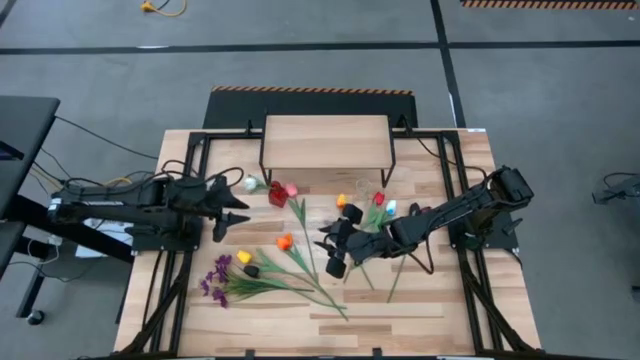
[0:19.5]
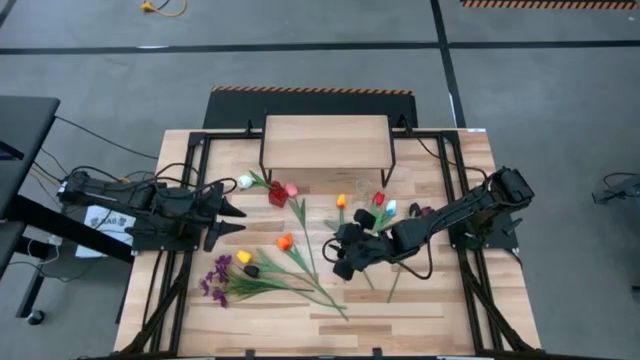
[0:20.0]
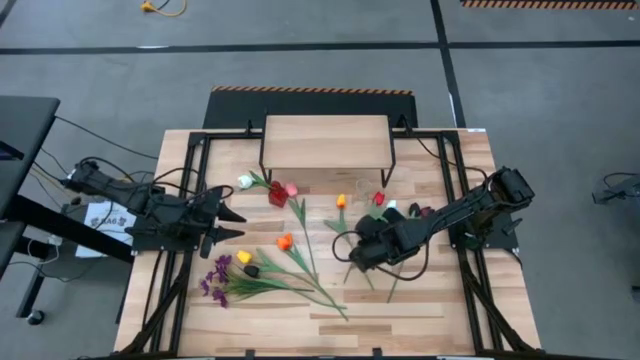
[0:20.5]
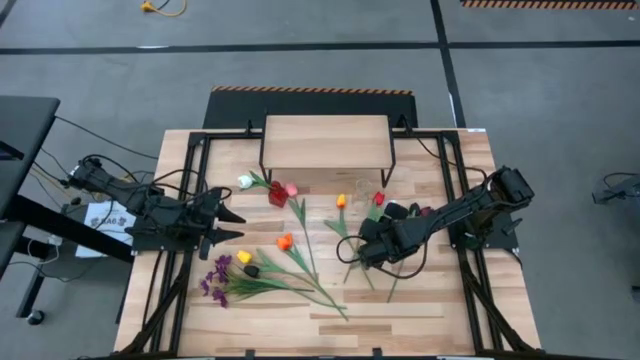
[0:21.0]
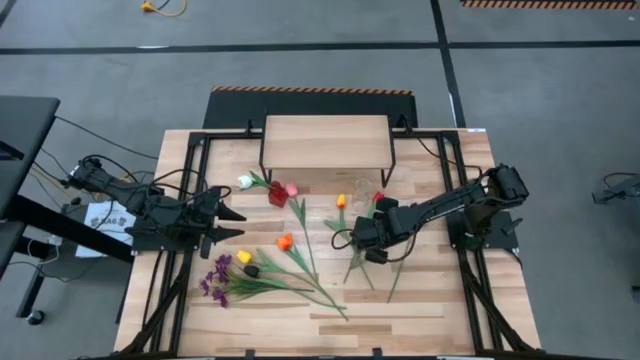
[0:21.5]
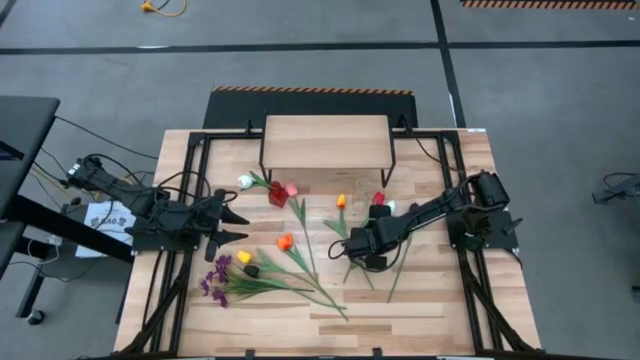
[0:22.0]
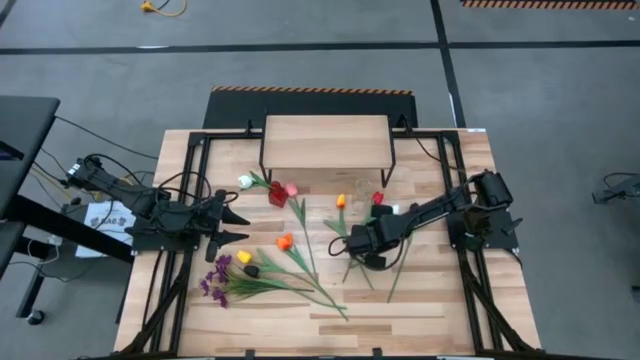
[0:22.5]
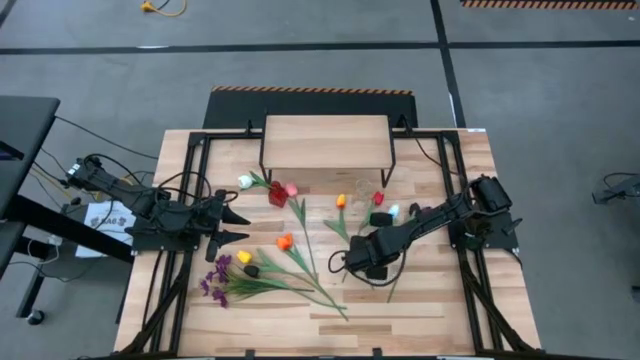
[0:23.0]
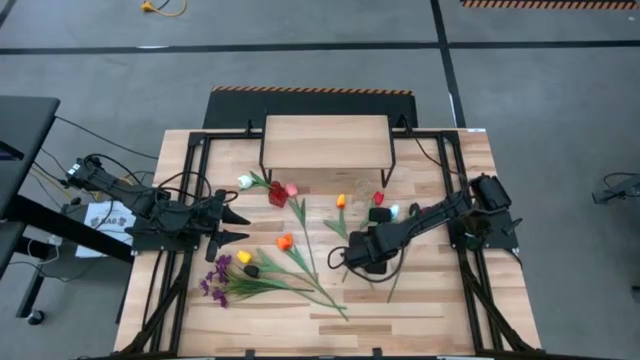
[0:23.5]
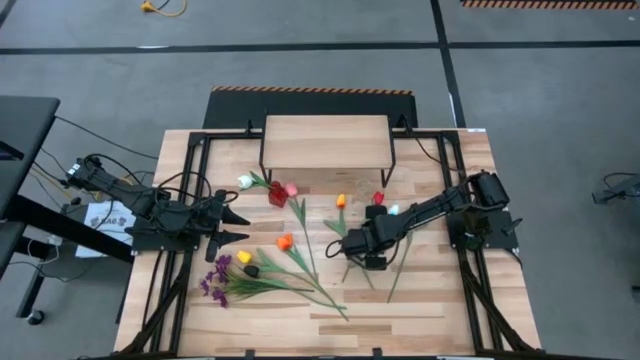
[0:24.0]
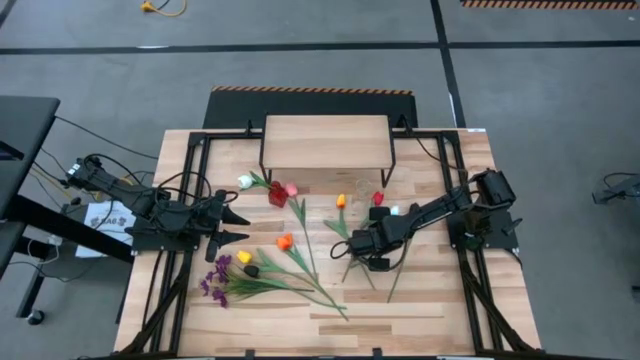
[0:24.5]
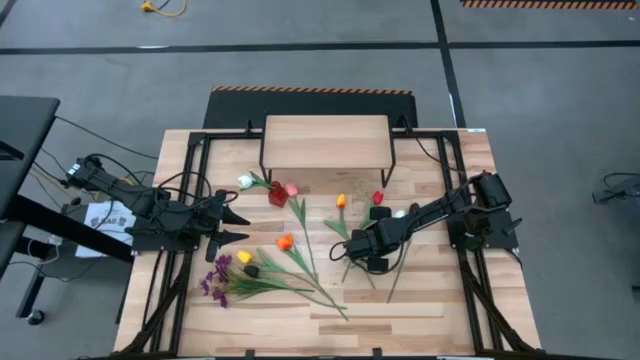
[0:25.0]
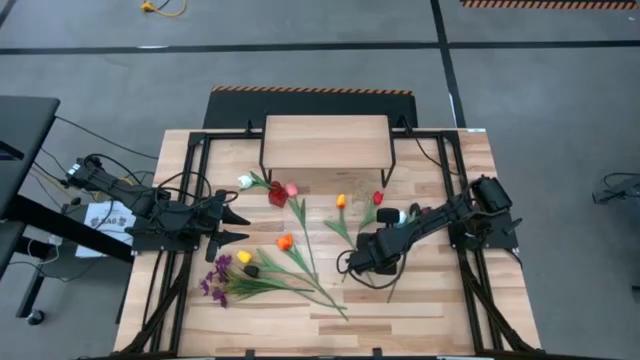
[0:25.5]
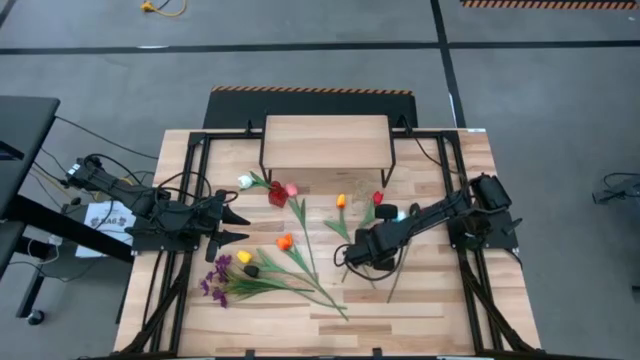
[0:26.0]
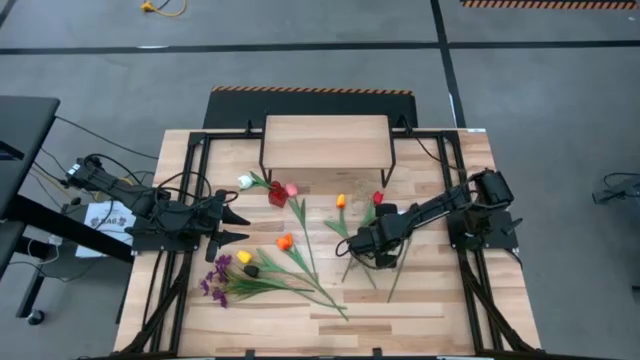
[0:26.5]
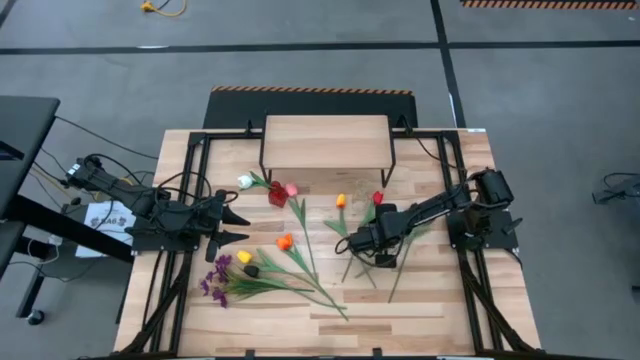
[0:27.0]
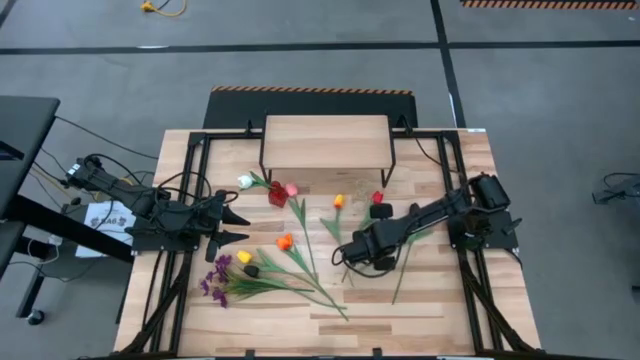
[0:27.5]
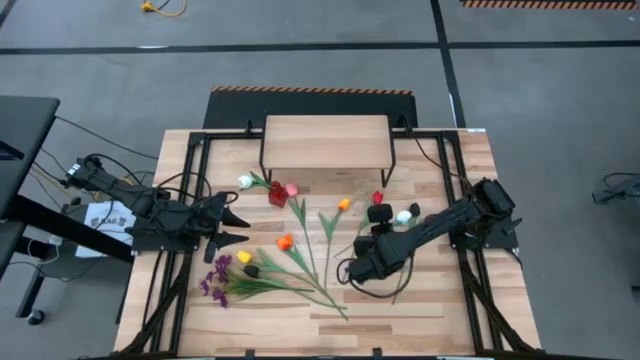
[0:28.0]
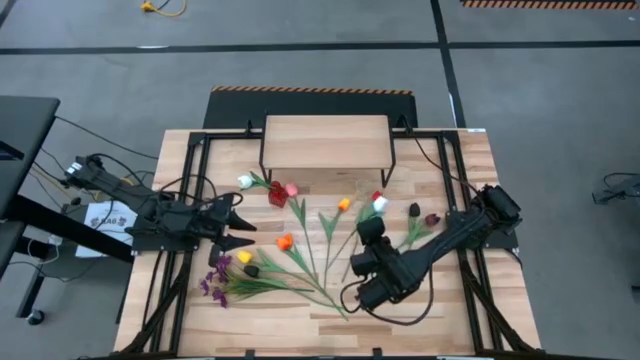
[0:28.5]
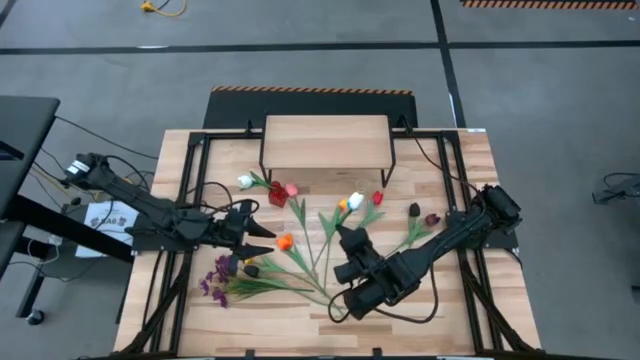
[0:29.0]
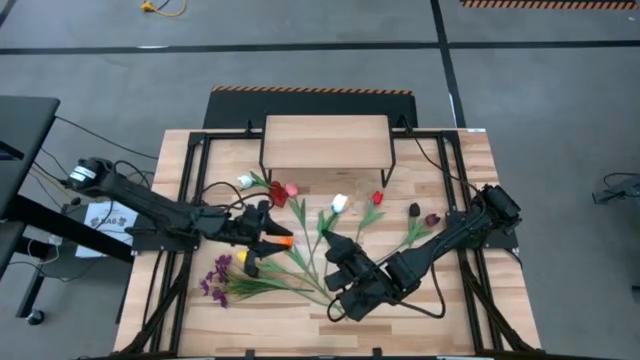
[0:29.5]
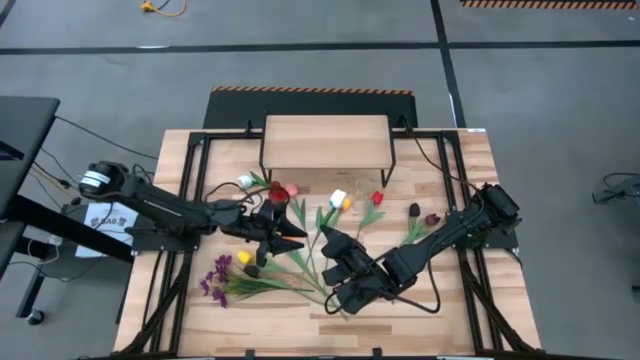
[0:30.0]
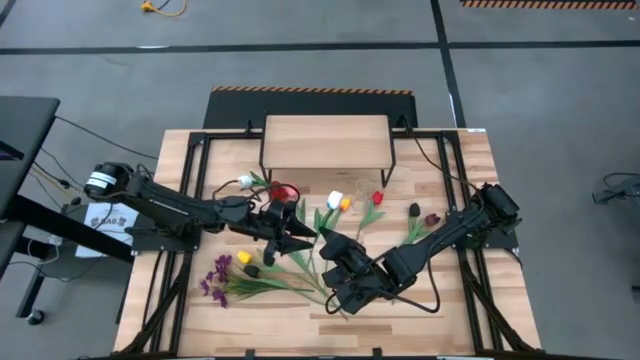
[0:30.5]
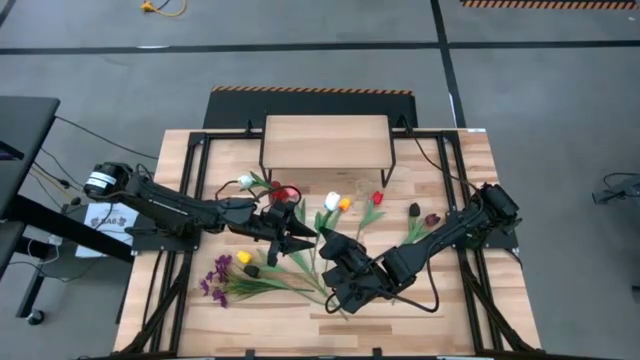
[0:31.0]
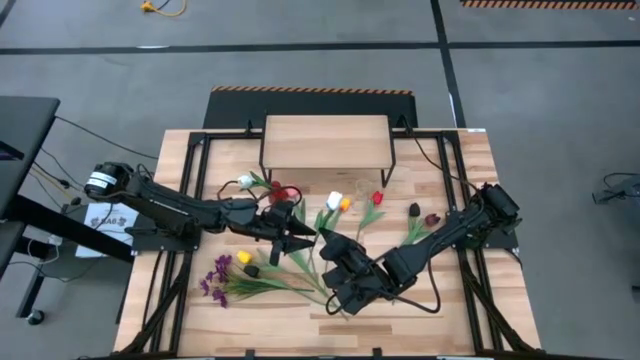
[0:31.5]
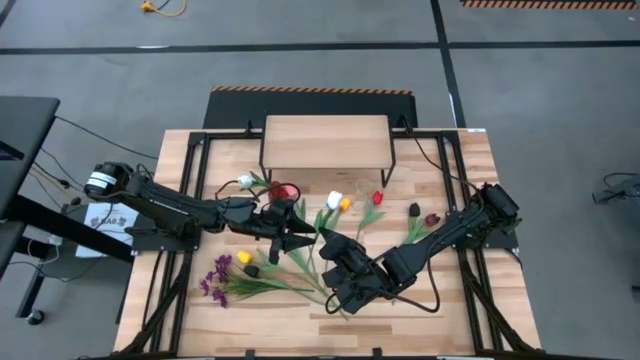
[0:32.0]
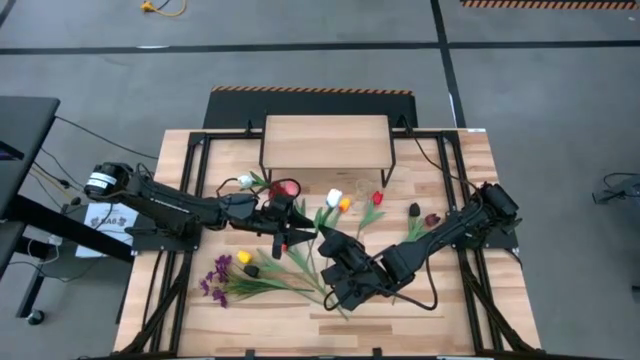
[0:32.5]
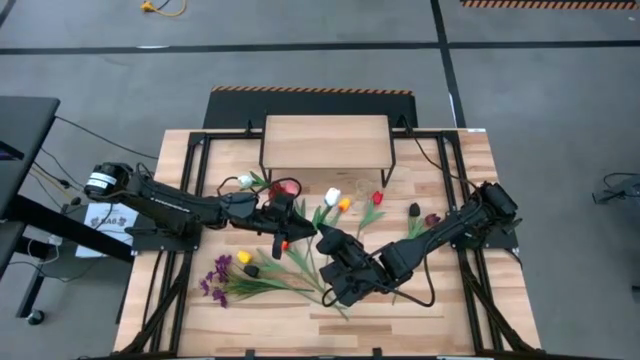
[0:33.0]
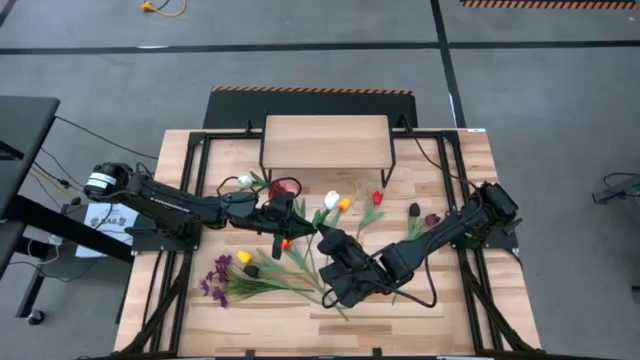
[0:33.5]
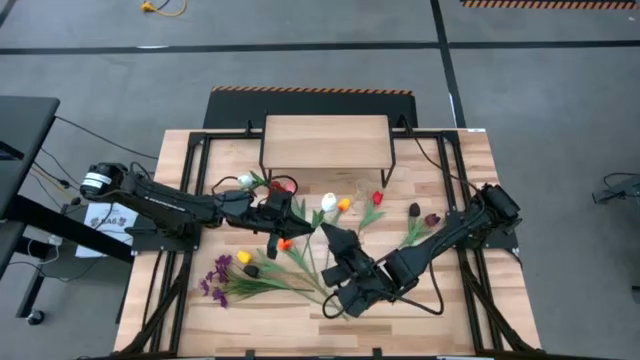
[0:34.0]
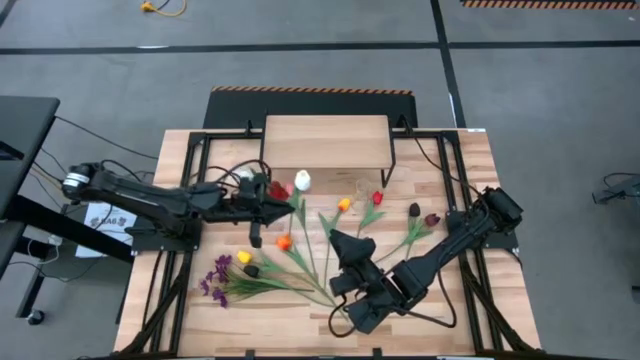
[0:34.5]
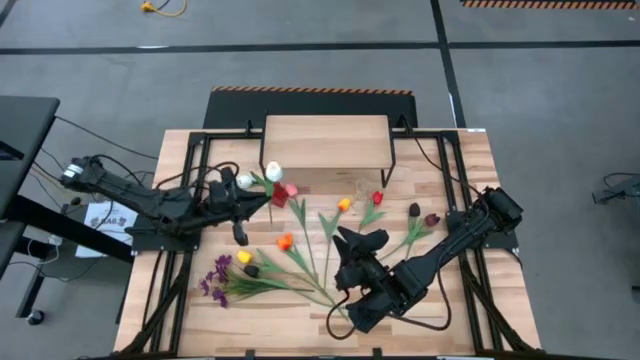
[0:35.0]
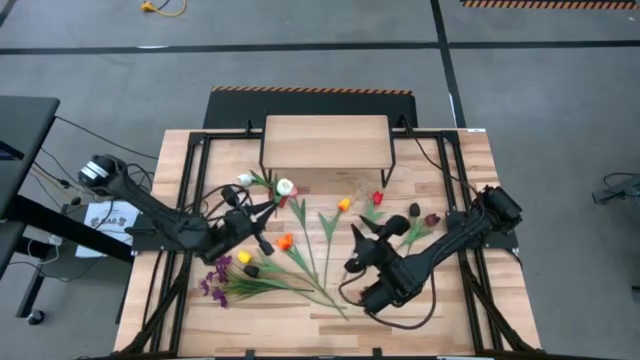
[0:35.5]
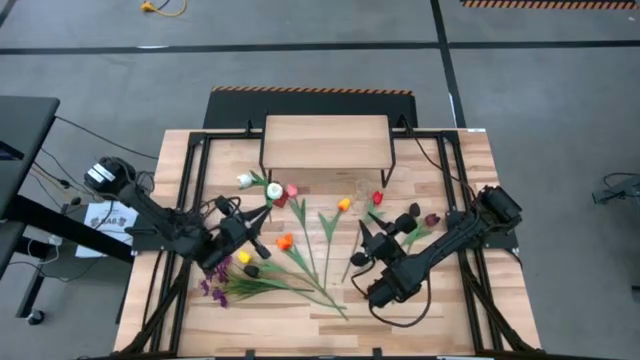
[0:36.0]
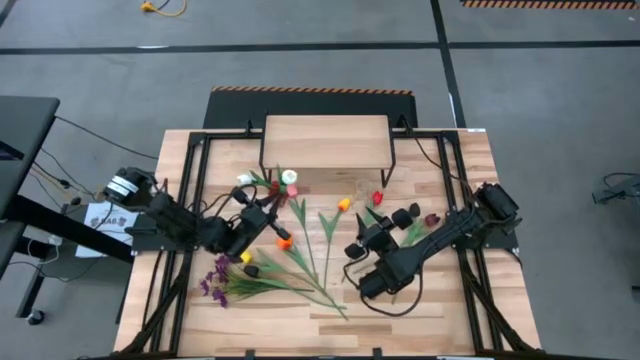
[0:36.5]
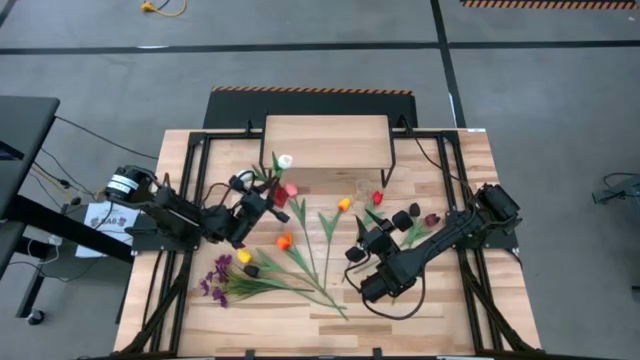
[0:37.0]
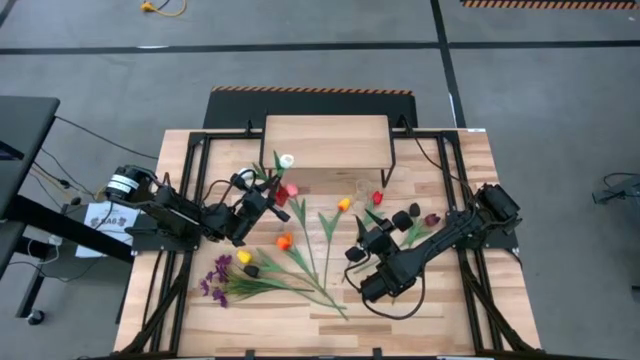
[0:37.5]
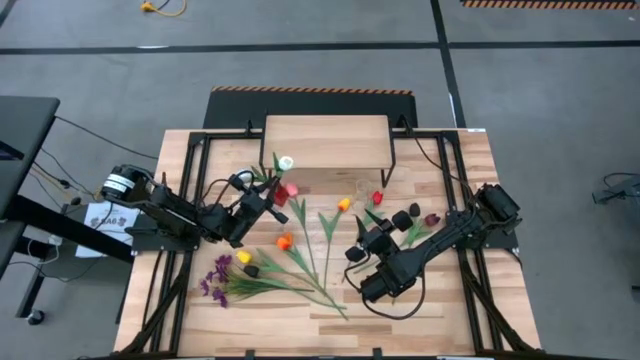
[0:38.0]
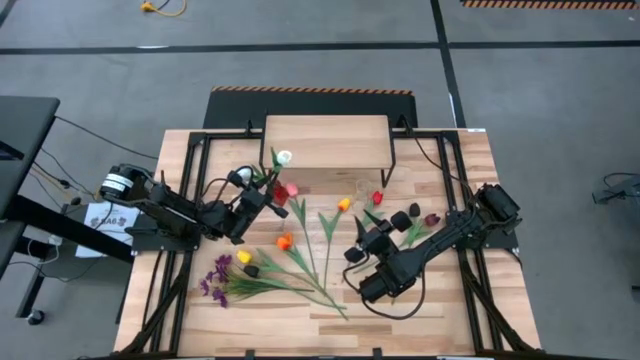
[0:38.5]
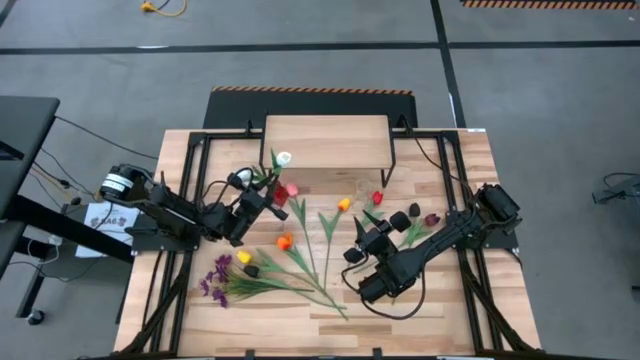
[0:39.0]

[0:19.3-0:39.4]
Task: Pick and place flowers into a vace then onto a shelf
Put the white flower into the red flower vase
